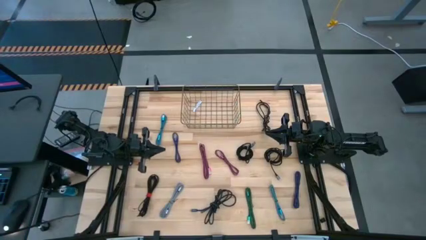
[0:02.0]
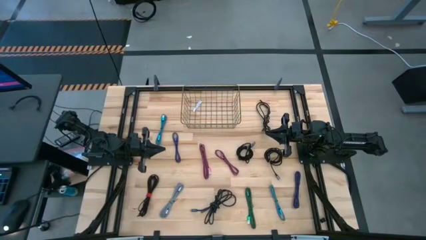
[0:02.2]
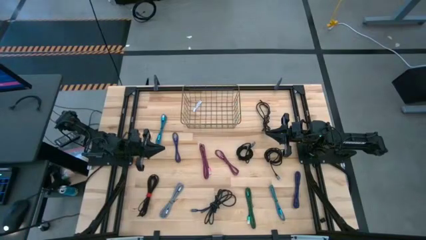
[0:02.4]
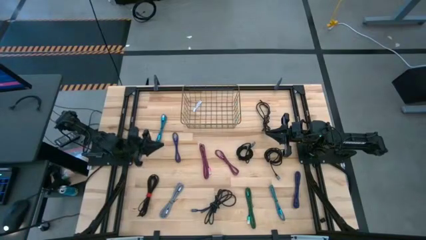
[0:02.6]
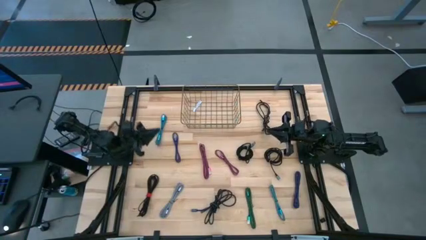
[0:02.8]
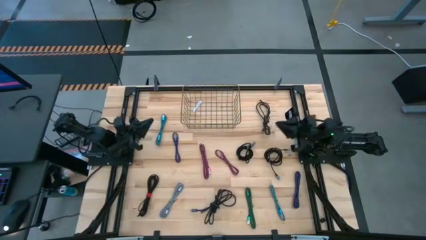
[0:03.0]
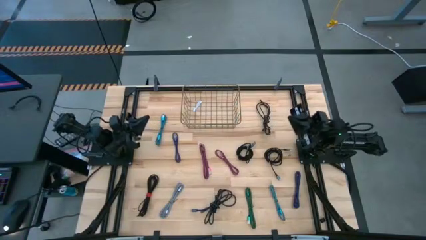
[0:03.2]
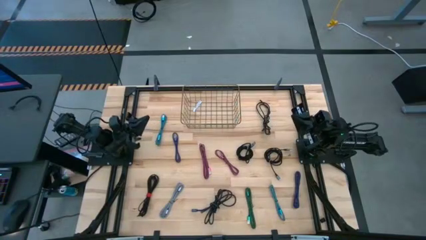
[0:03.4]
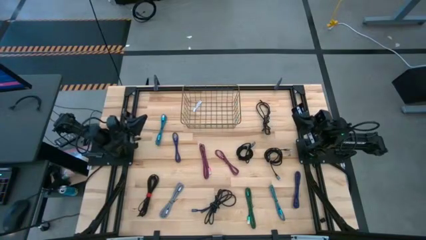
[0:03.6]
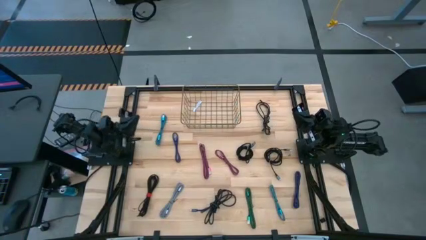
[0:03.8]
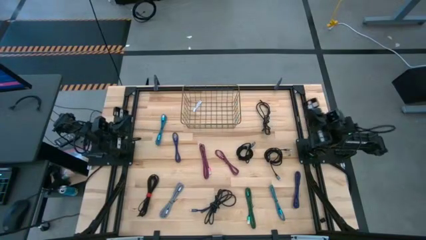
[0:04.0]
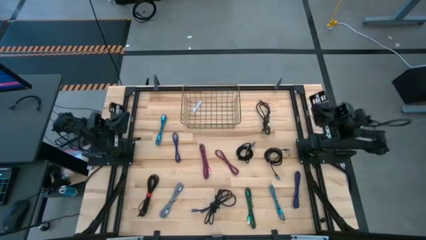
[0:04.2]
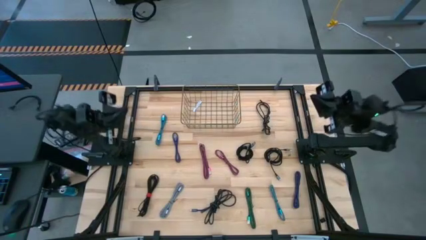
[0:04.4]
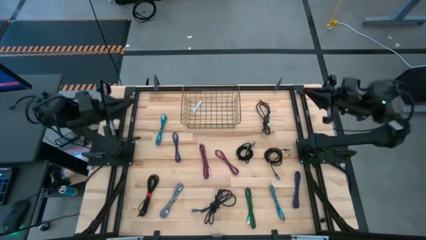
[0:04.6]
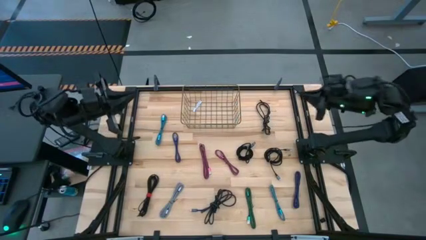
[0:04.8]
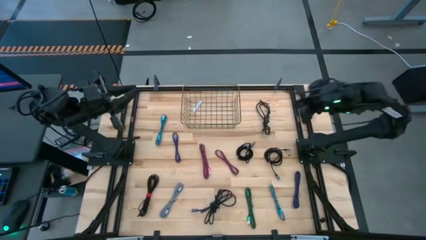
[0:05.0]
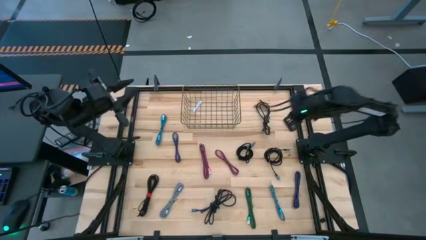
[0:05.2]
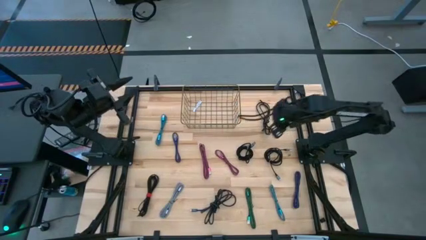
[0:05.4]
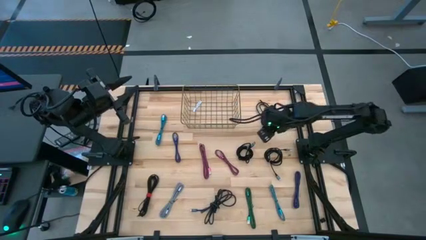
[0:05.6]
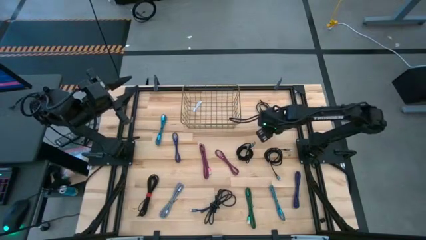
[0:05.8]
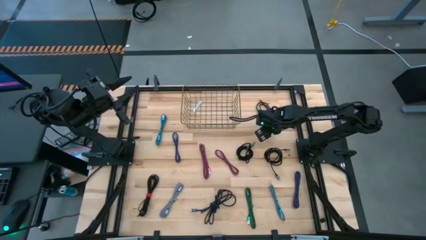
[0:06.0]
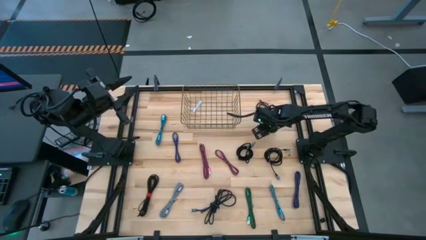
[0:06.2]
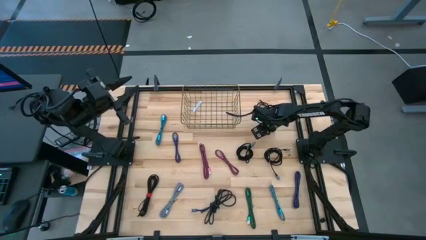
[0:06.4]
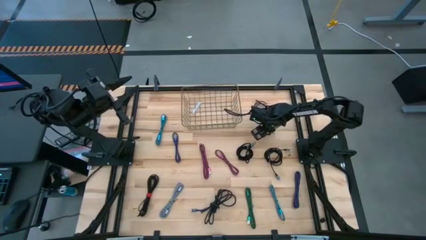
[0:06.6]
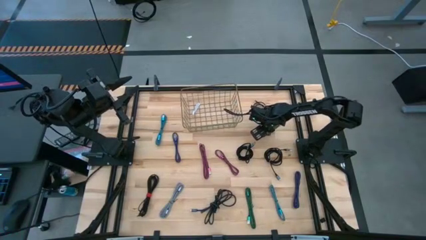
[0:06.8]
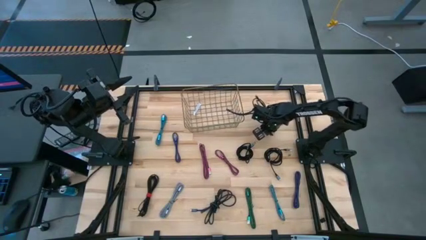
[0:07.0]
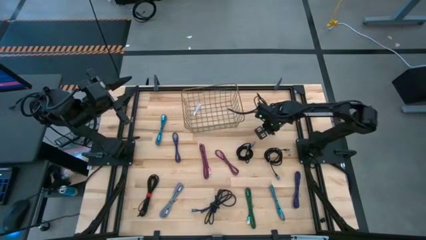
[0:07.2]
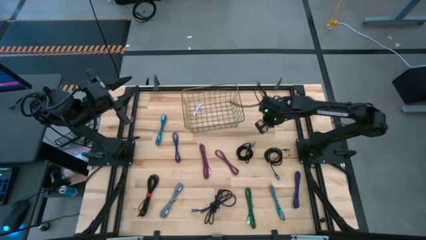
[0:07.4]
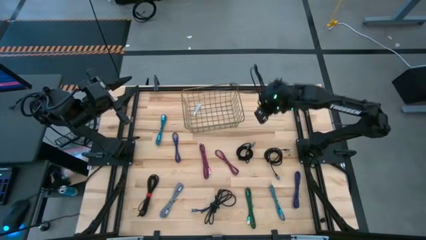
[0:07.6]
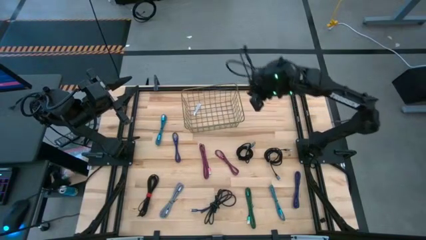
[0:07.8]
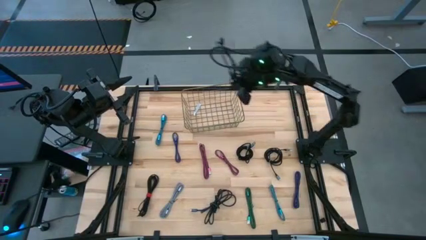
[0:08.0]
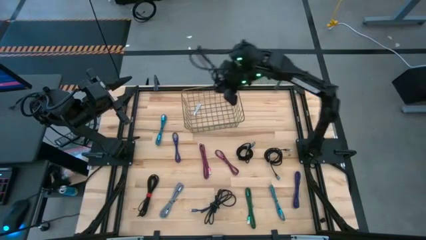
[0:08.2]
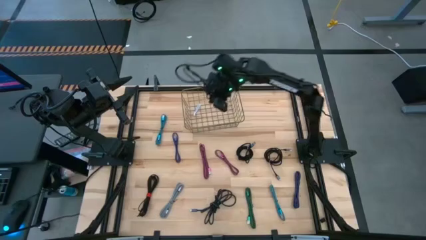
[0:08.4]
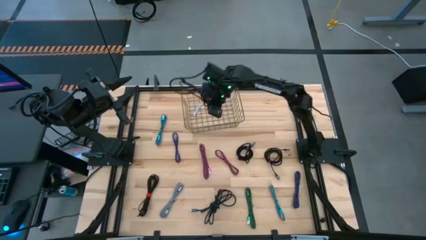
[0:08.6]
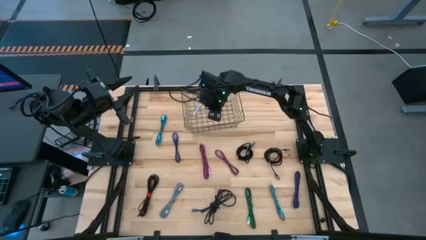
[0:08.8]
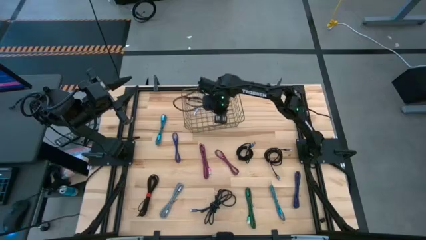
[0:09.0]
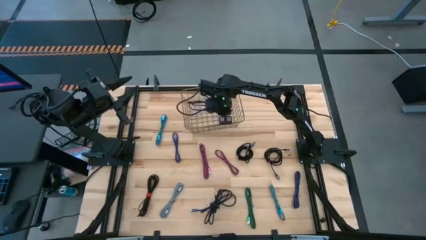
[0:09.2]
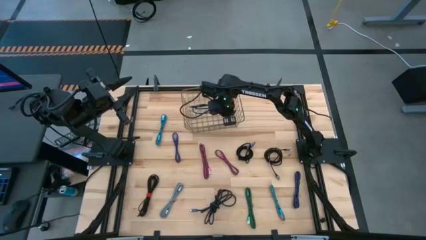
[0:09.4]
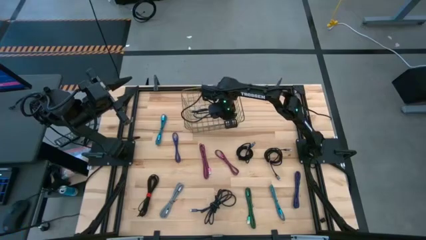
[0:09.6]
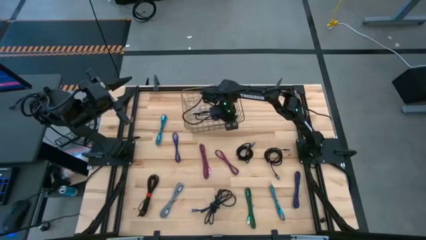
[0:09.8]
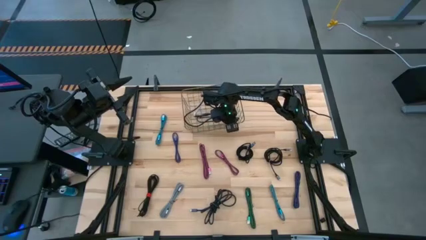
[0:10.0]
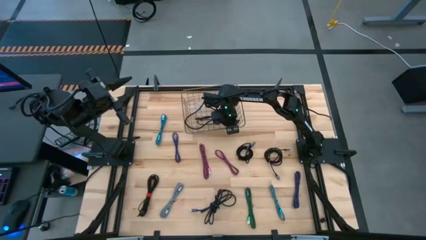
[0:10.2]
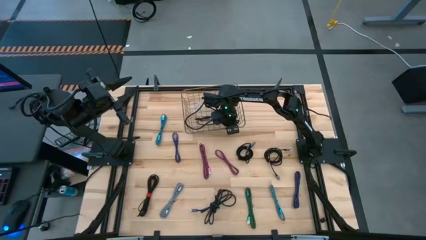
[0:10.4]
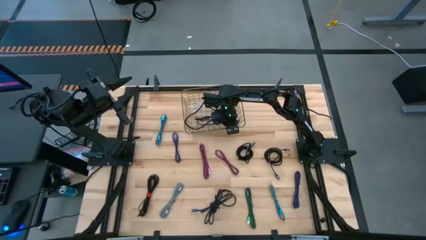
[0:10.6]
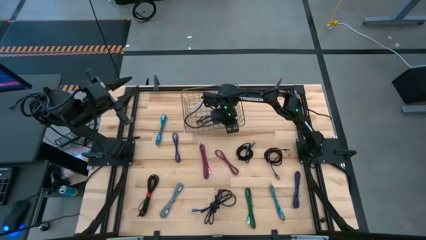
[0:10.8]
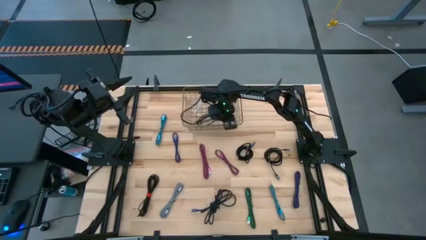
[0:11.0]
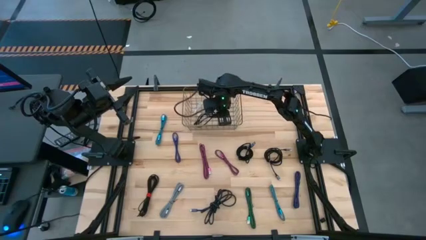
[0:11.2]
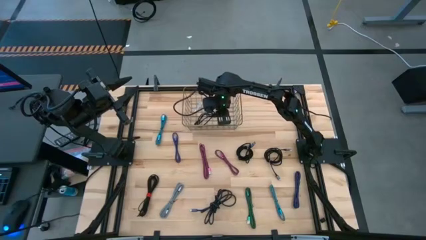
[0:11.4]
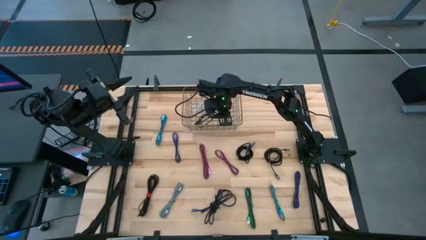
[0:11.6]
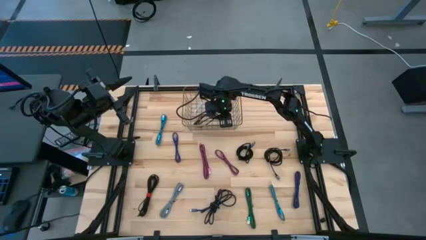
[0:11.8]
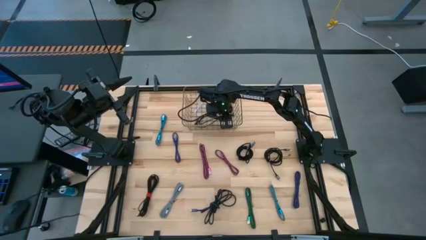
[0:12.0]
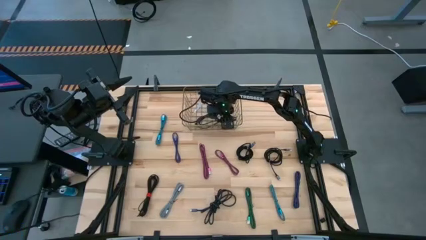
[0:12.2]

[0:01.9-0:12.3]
Task: Pick and place USB-C Cables
Put the black charger cable into the wire basket

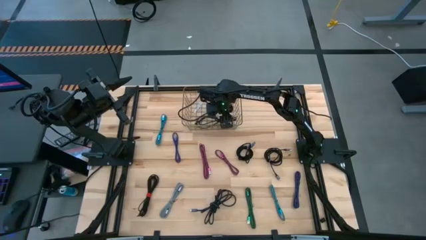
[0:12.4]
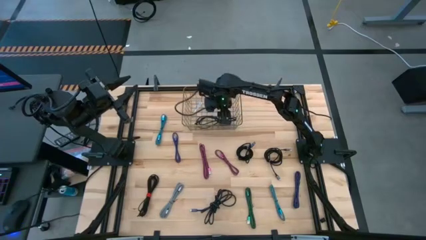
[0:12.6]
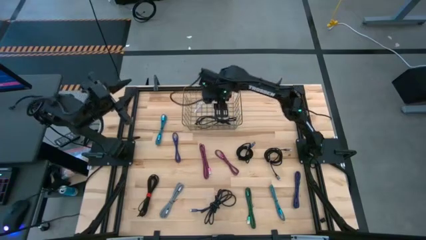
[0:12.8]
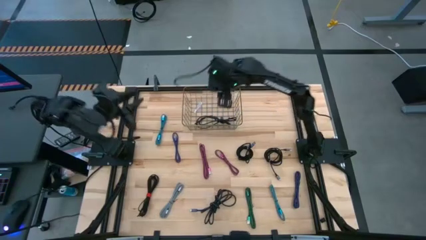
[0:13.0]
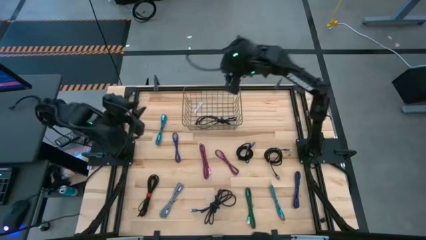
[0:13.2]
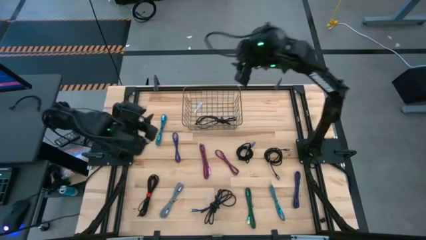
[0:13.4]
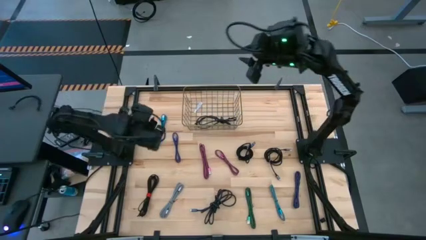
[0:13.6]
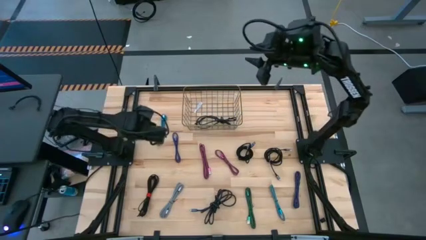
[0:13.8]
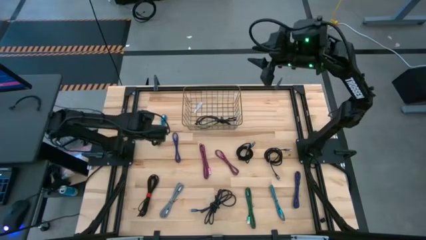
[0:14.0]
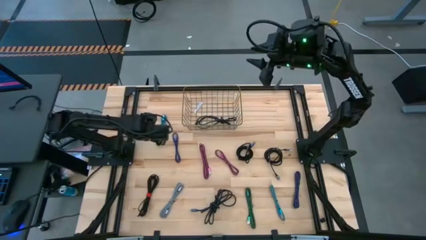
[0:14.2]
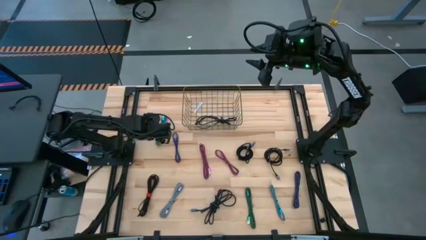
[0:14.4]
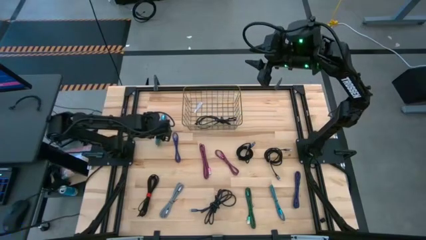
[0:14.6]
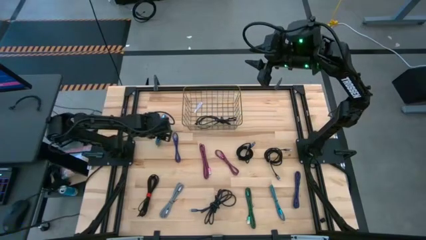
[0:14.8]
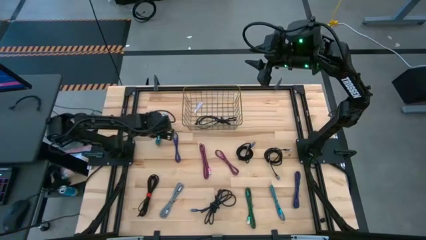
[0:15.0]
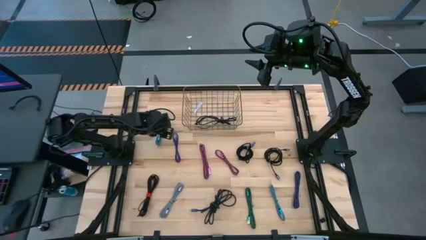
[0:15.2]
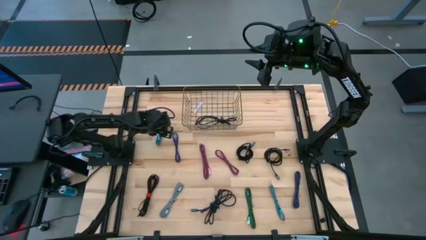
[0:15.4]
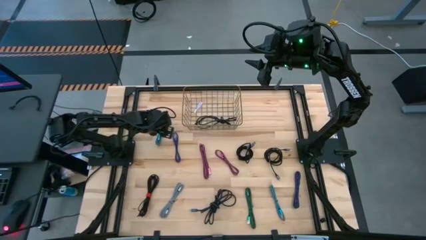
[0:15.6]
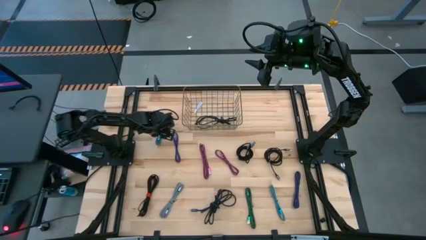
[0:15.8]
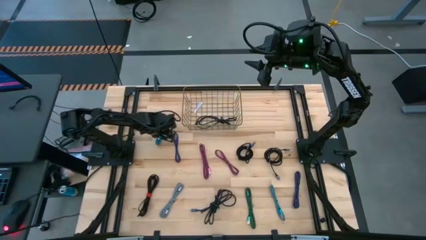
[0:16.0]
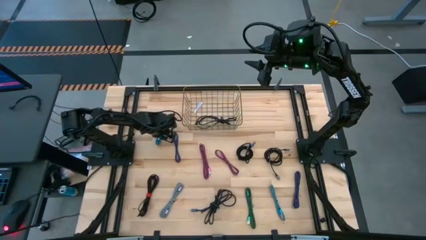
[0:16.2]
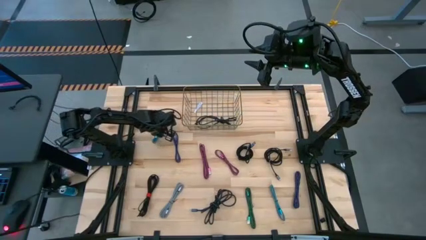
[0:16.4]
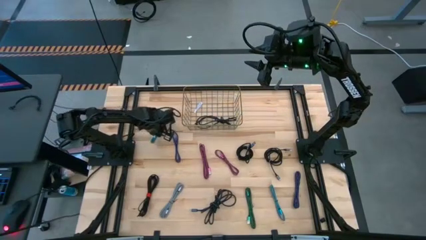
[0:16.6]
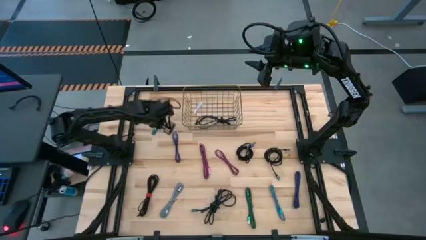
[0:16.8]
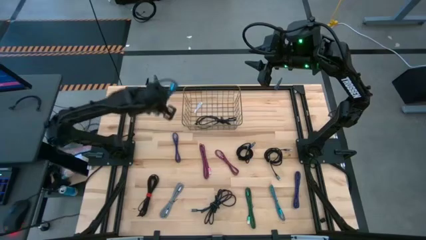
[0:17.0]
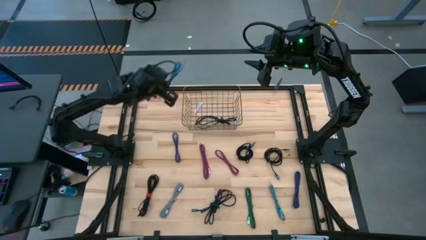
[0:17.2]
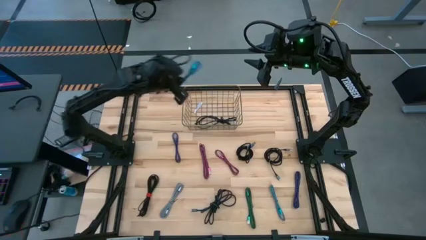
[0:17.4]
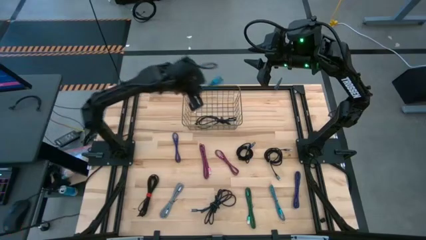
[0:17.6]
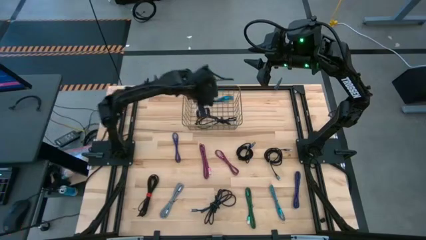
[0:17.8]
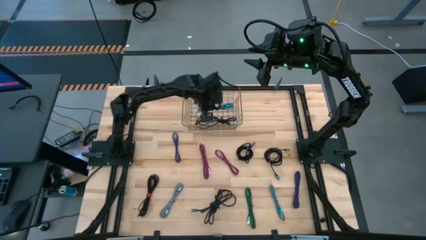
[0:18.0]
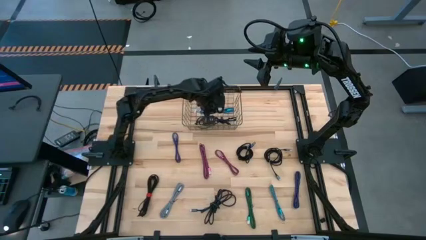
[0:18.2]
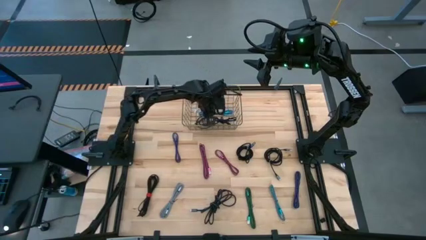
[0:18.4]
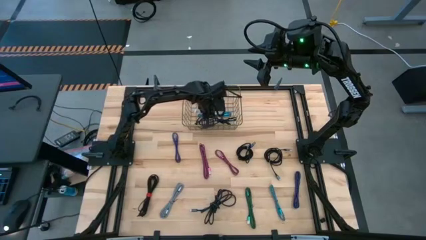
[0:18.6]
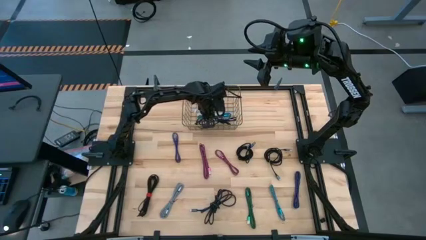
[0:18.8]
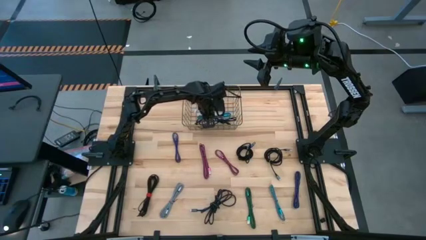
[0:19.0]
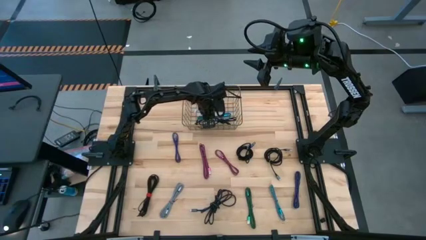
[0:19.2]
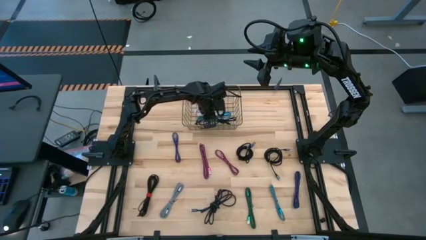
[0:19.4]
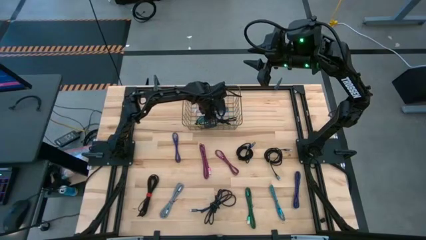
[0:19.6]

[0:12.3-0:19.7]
Put the blue charger cable into the wire basket
